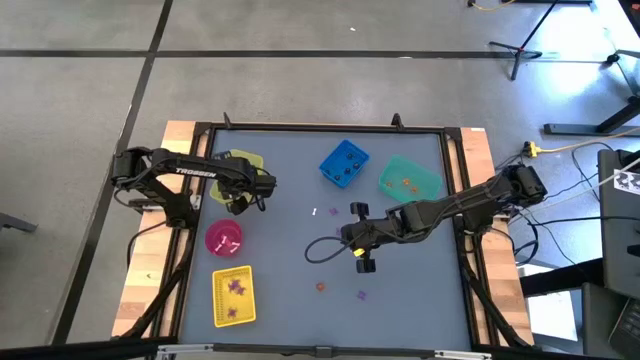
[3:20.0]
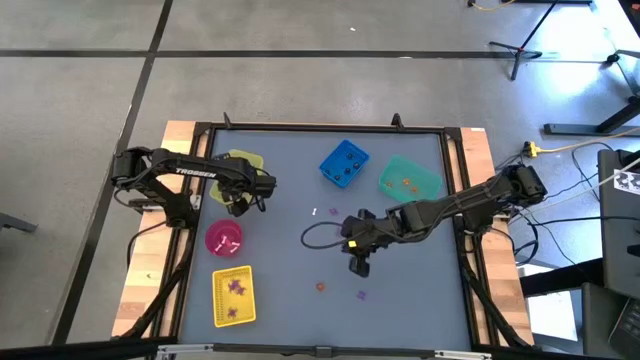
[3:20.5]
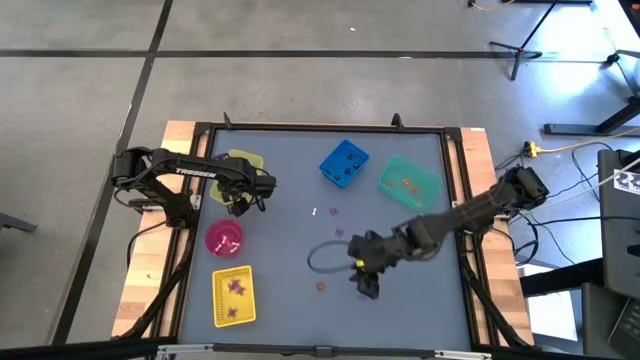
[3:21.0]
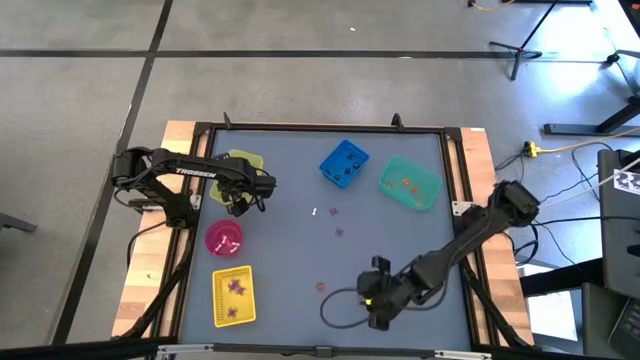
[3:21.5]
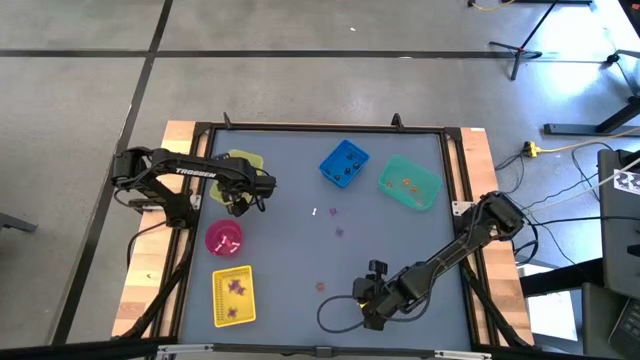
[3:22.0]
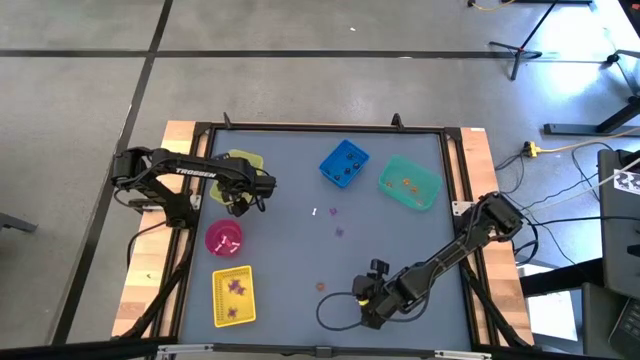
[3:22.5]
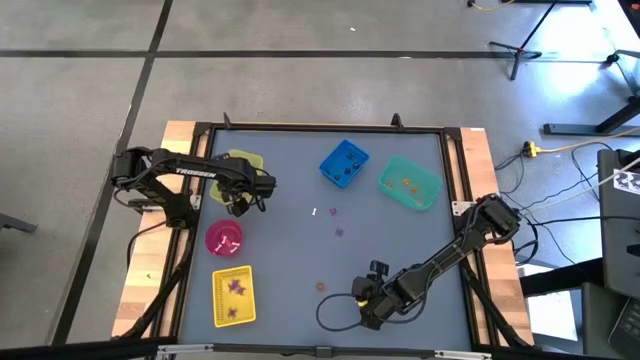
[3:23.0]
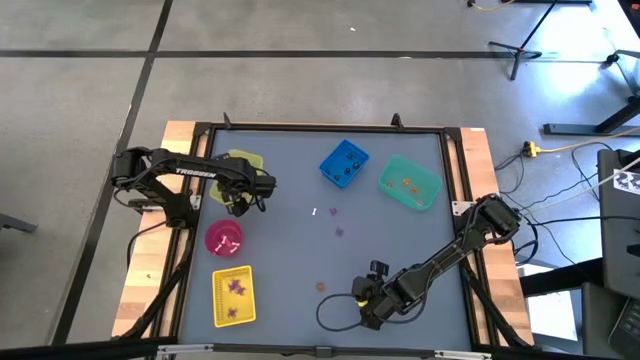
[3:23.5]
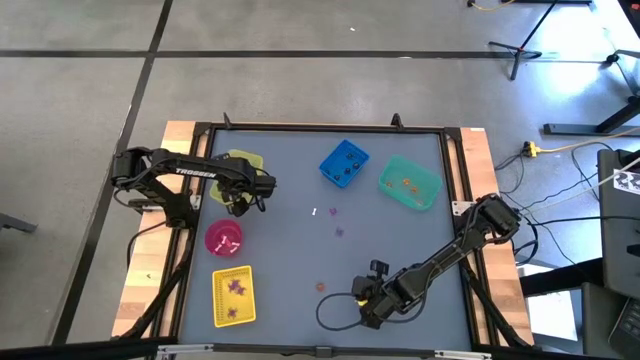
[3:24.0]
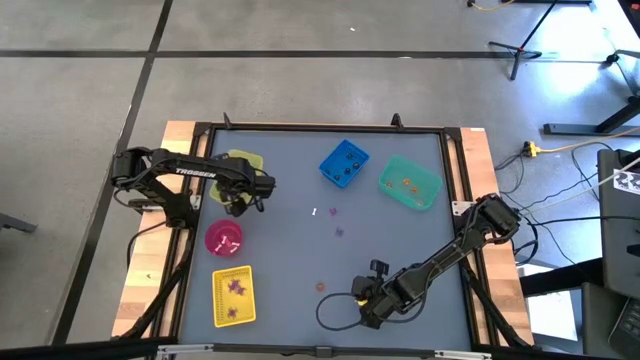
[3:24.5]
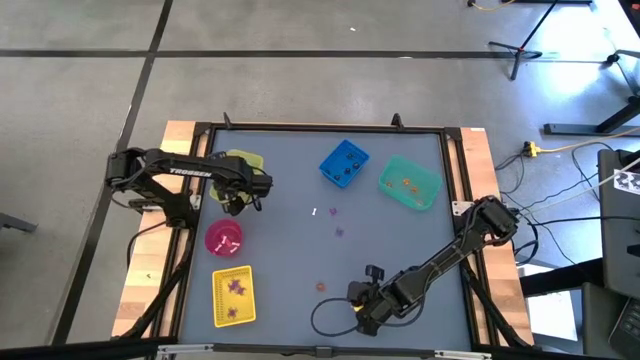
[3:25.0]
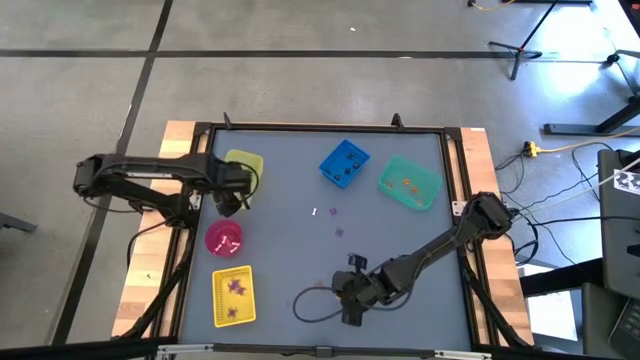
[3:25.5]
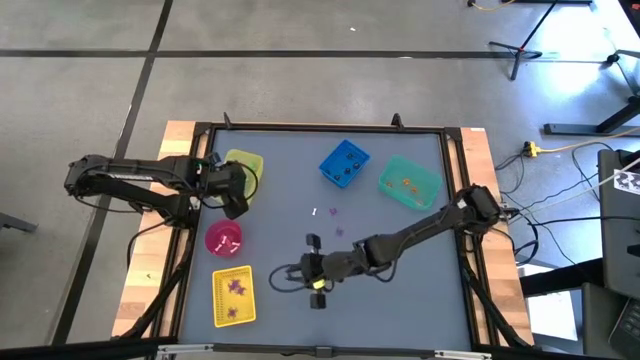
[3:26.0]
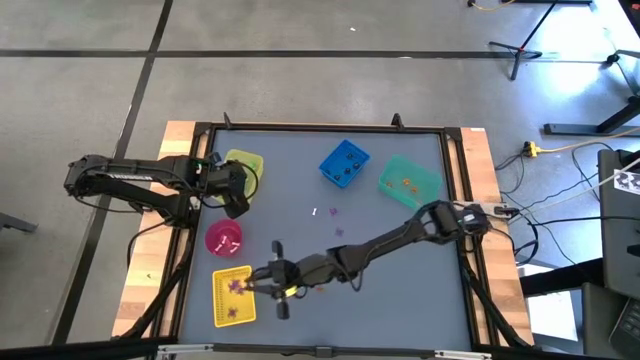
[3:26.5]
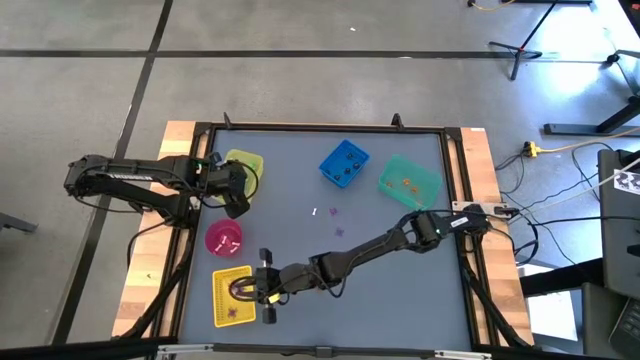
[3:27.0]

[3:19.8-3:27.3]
Task: Sort Halloween decoration
Put the purple spider toy into the yellow basket

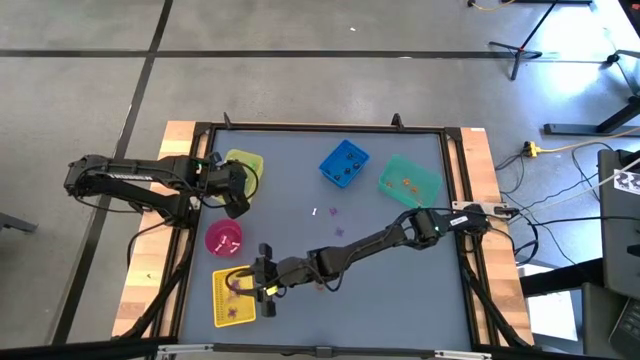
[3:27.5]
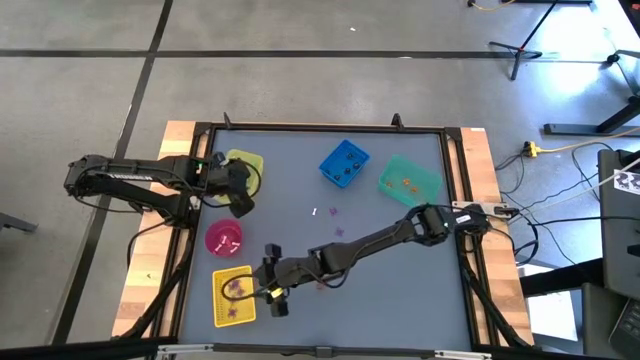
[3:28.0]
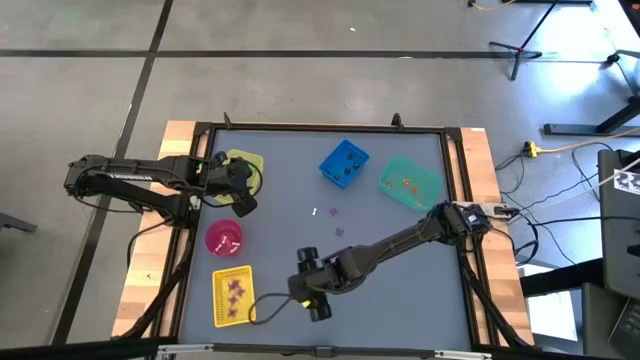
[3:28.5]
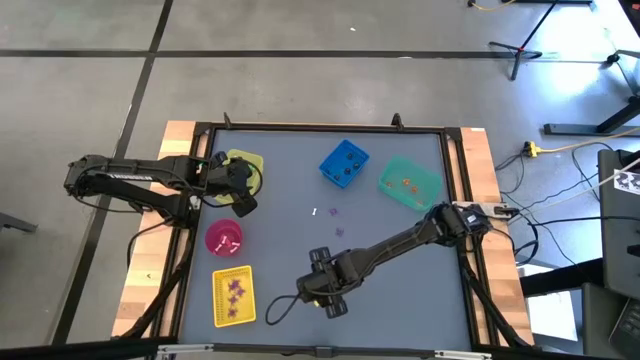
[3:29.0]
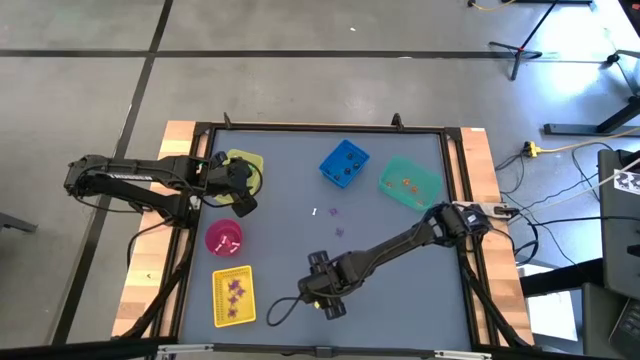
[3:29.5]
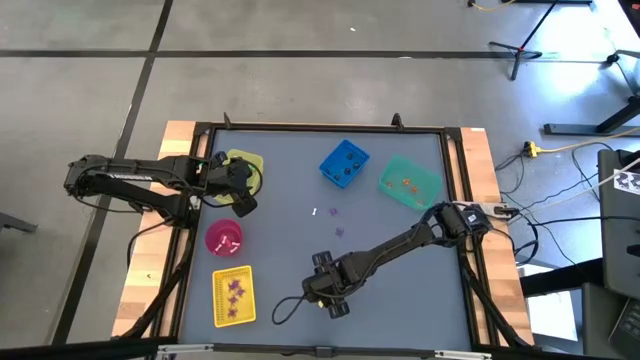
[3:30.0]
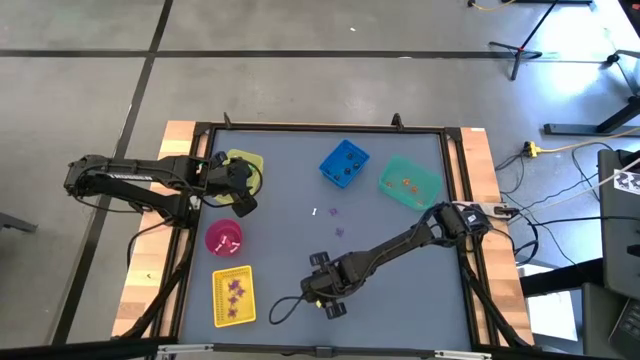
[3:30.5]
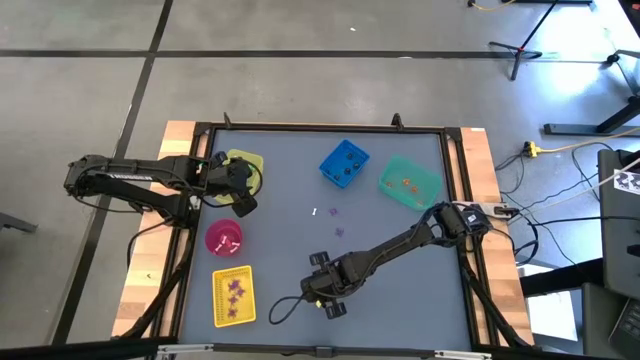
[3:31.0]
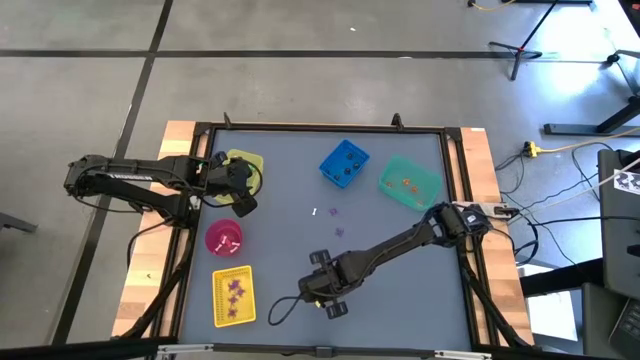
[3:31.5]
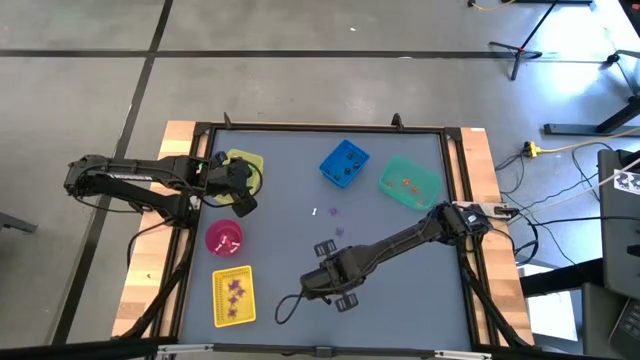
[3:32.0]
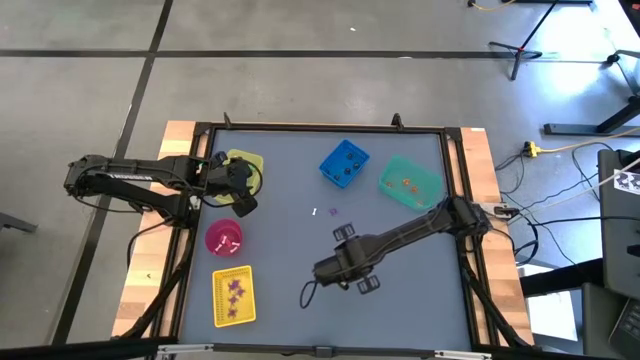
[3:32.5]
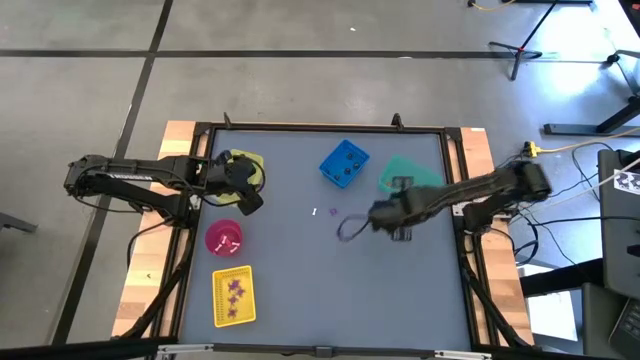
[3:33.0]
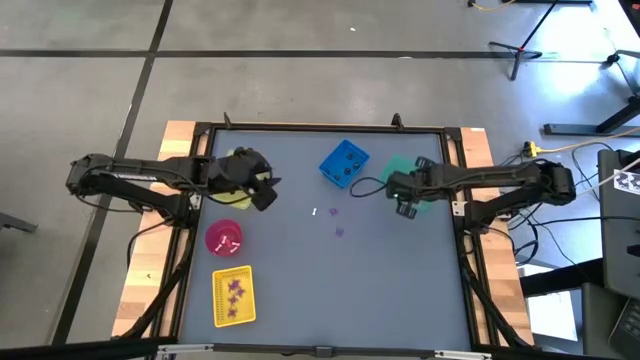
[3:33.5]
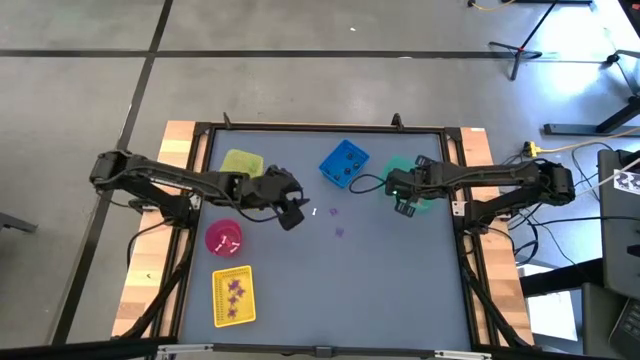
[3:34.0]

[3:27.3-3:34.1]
Put the orange pumpkin toy into the green bin

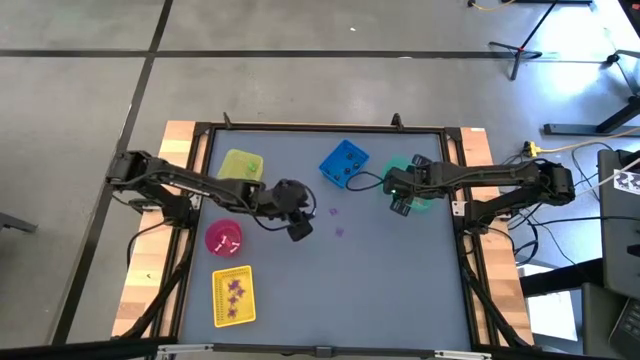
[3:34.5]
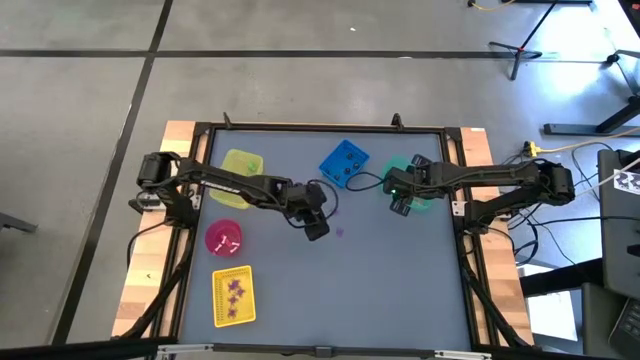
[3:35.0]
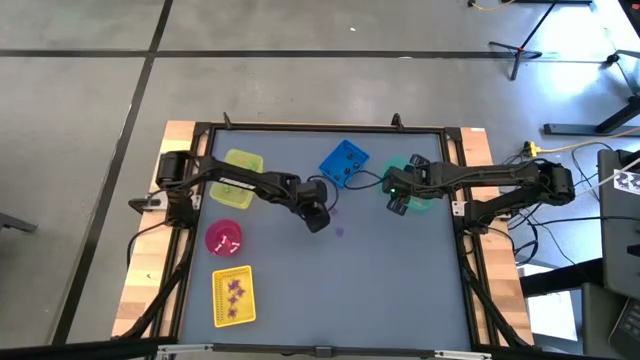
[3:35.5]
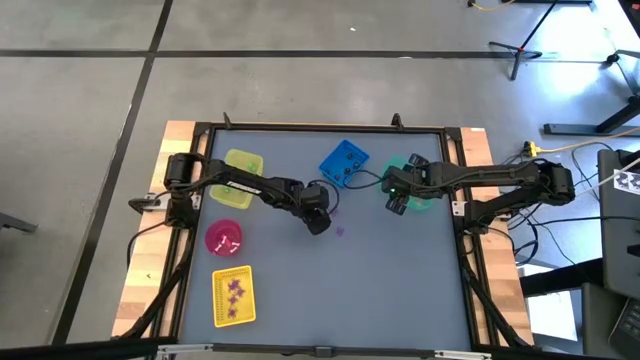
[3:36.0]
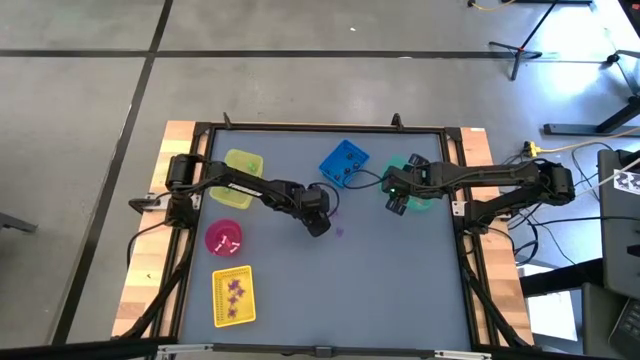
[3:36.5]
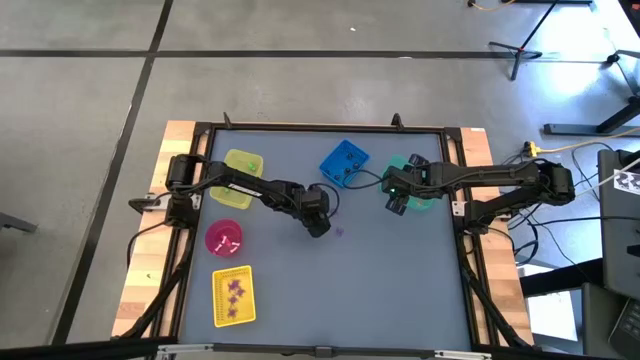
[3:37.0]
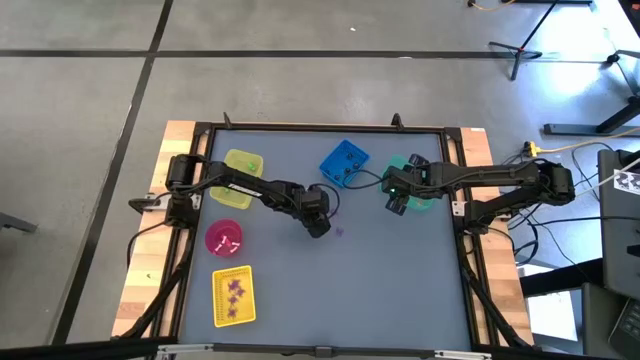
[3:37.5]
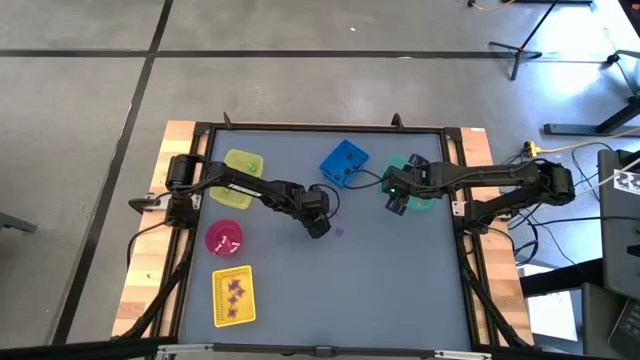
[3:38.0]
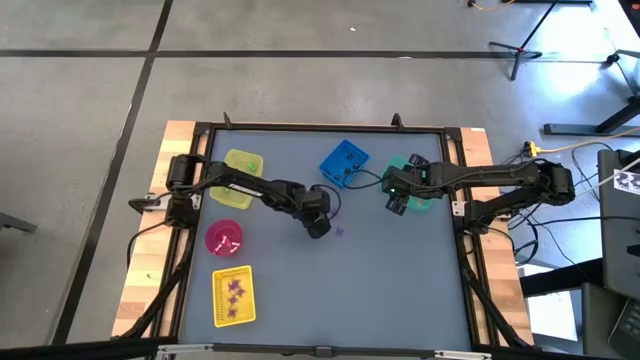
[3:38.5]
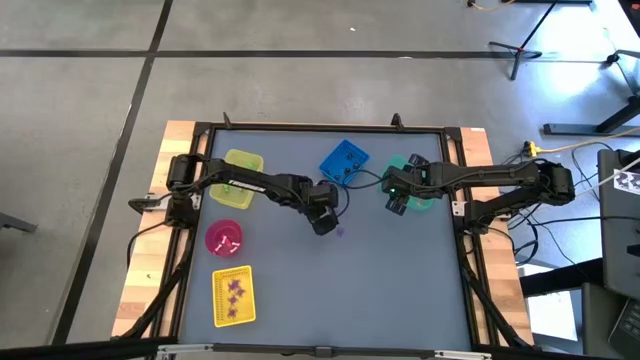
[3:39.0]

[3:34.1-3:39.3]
Put the white bone toy into the red bowl

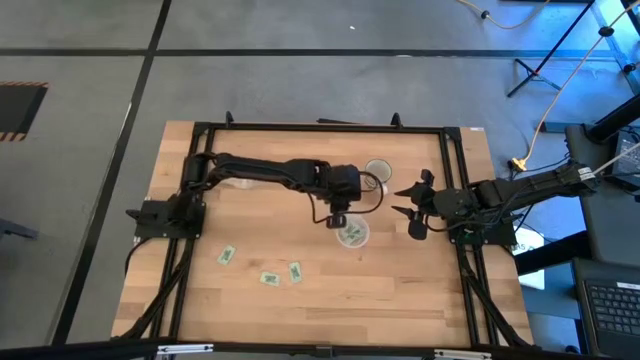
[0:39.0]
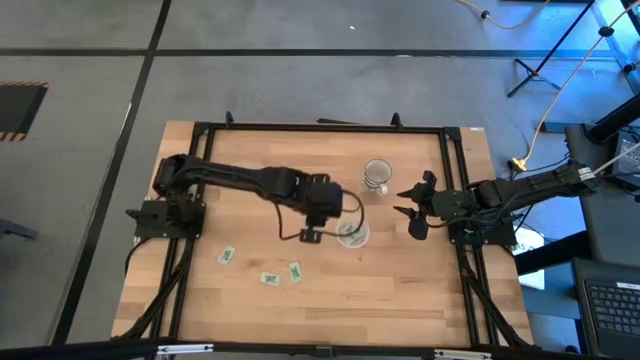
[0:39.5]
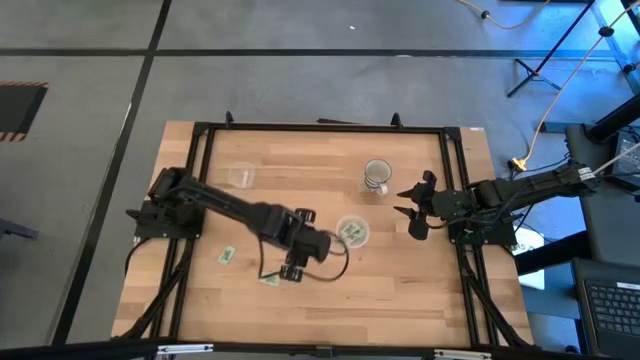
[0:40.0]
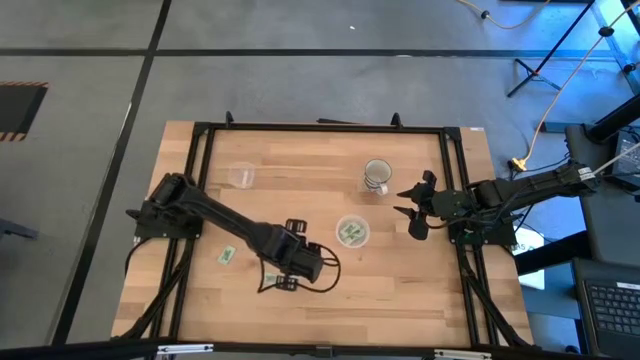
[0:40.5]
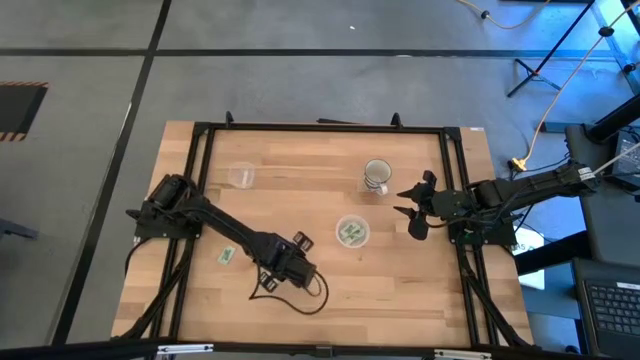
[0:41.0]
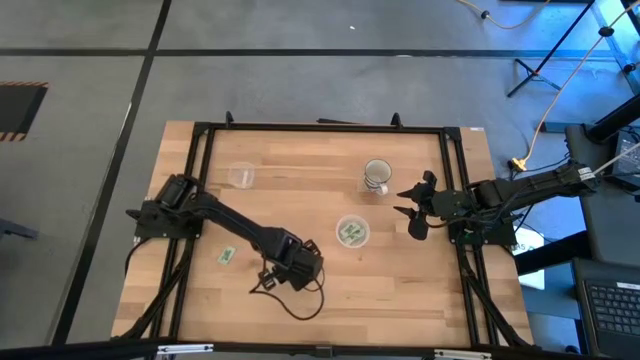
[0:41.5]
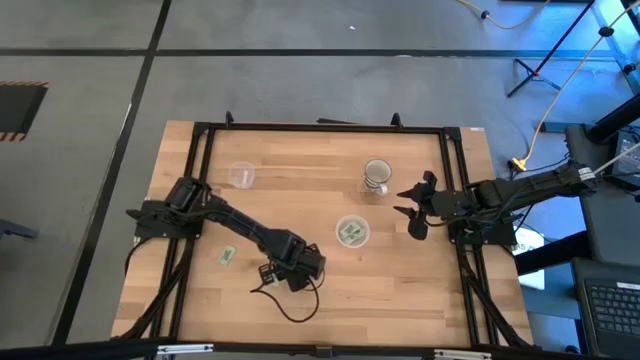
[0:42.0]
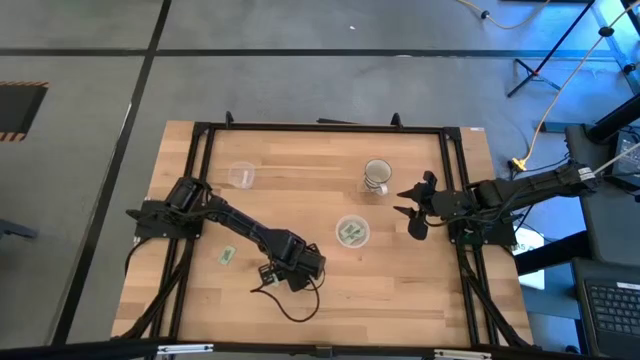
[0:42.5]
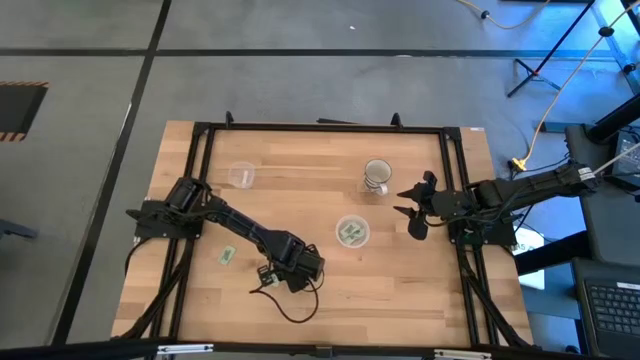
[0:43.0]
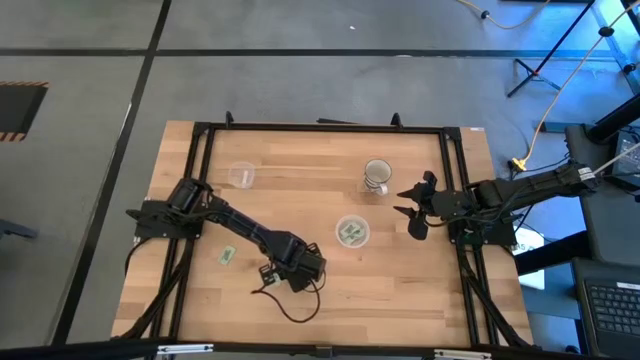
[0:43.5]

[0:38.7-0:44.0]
Task: Pick and place Stevia / Truvia into bins
Put the green sugar packet into the circular transparent container
